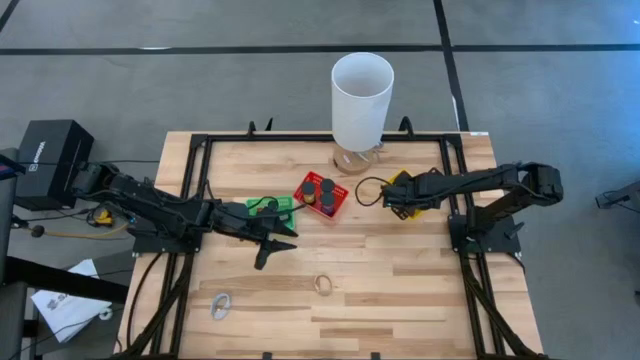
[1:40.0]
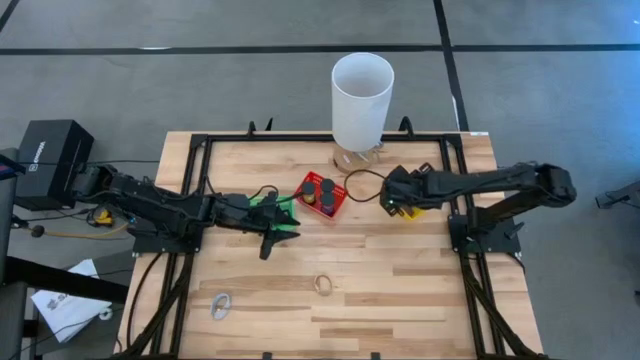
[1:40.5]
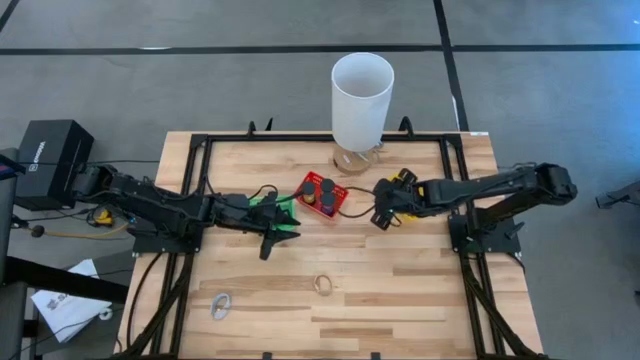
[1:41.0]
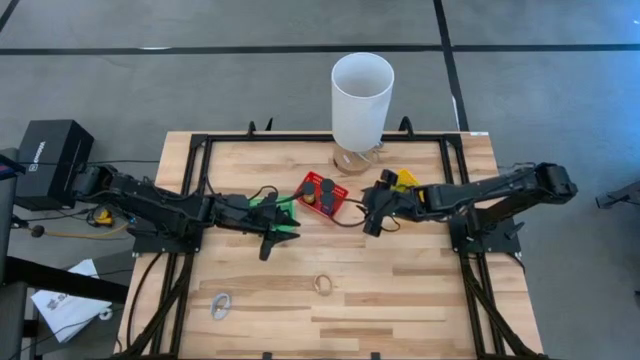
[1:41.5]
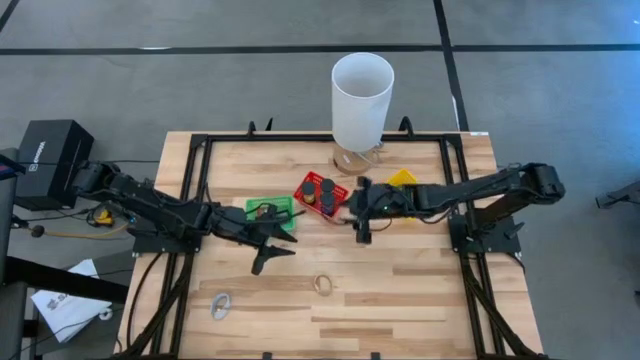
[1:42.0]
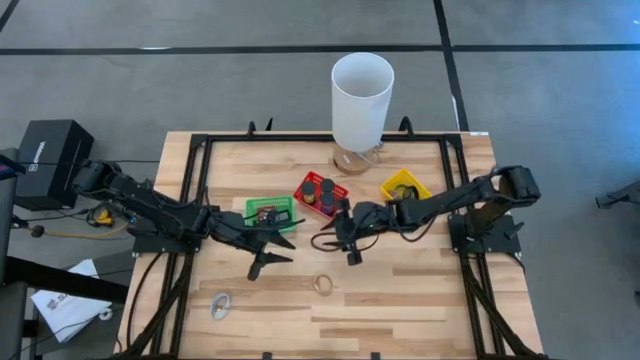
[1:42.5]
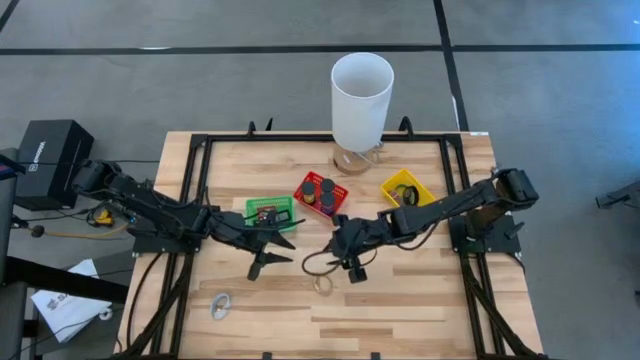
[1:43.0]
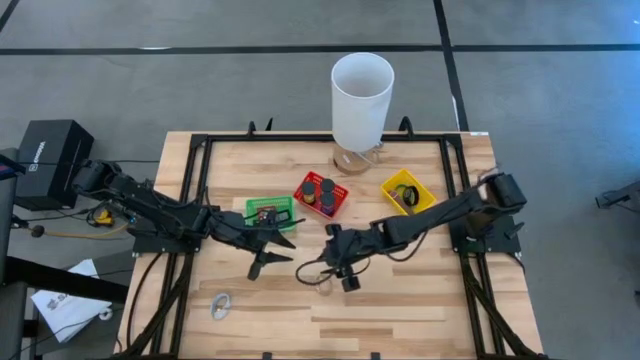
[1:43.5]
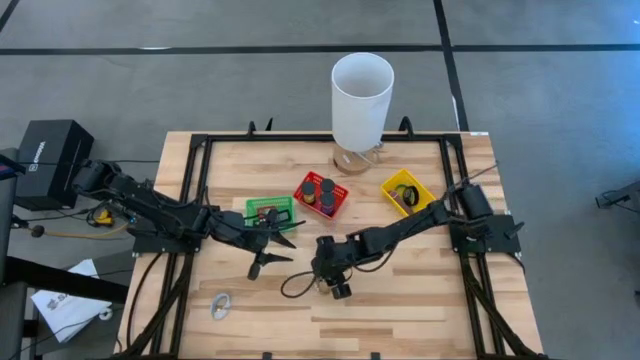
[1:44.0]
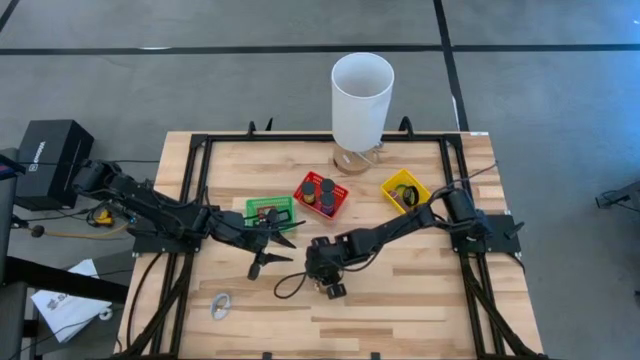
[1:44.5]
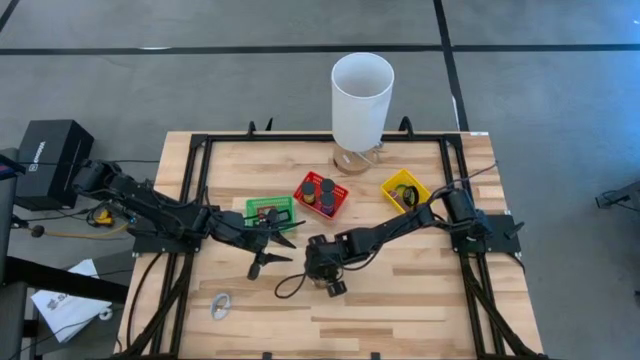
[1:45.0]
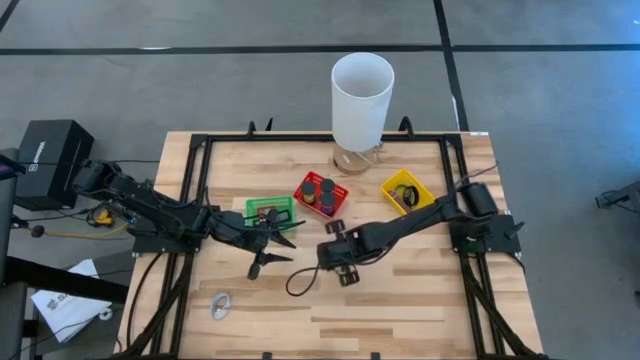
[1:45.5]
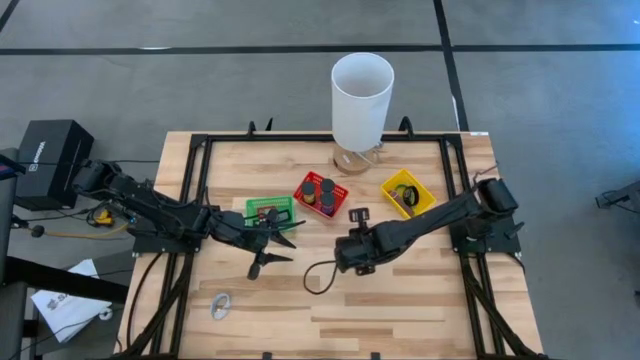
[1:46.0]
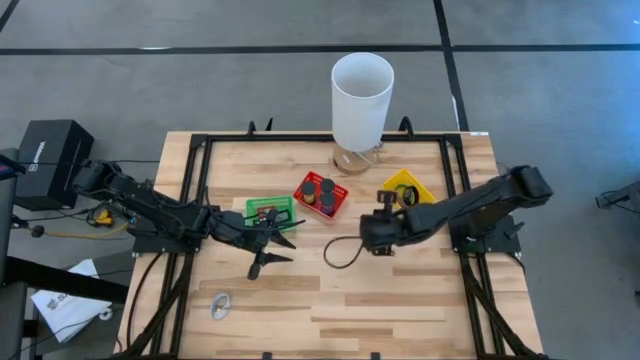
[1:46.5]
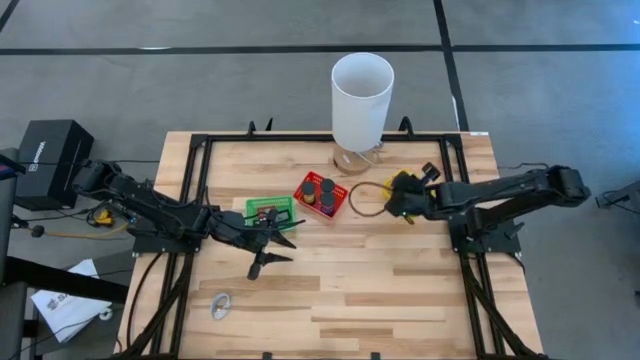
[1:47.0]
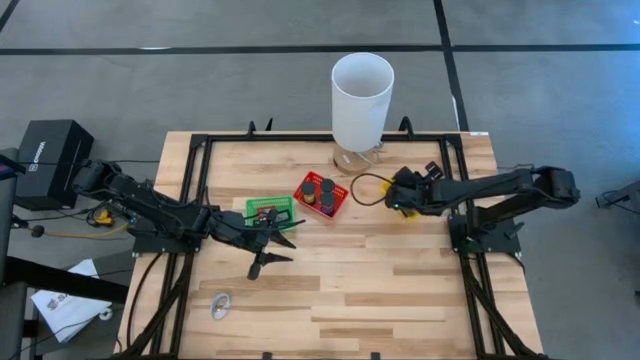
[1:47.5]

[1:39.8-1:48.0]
Task: Pick & Place Office items
Put the gold watch into the yellow bin

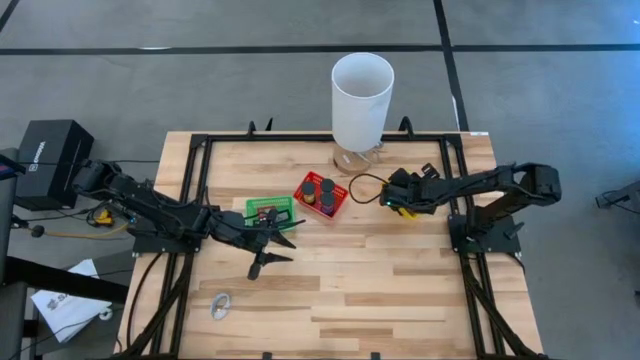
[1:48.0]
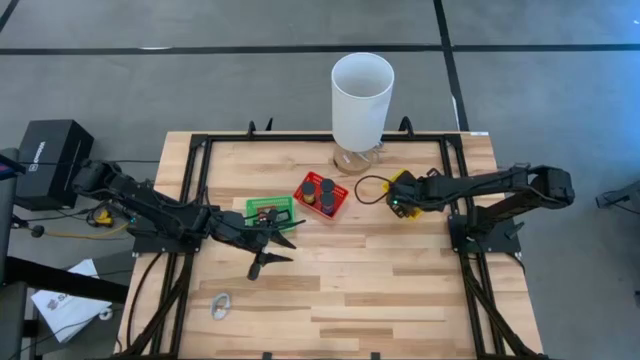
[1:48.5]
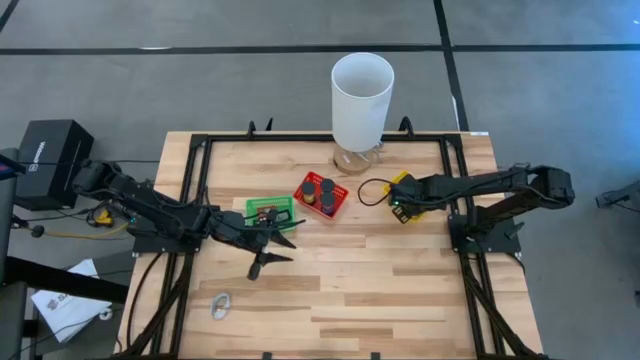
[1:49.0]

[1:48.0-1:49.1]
Adjust the black watch

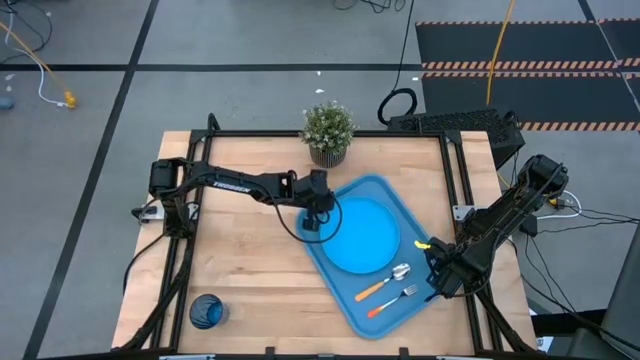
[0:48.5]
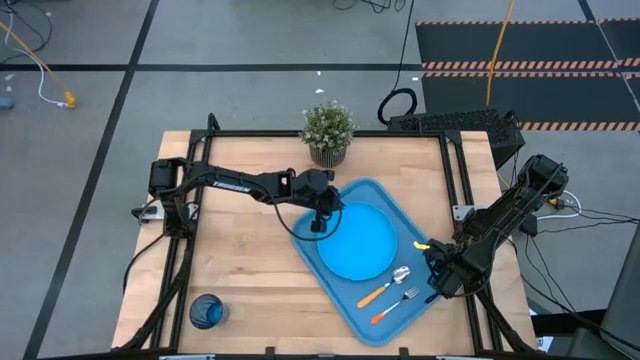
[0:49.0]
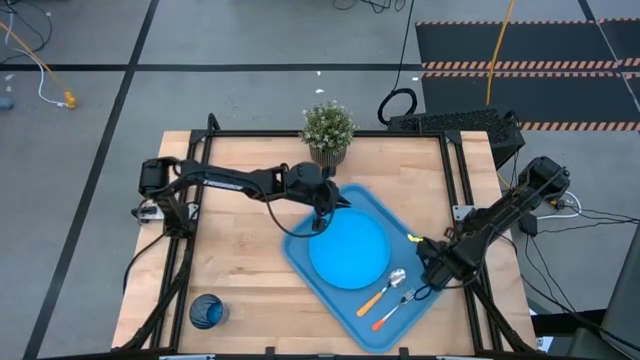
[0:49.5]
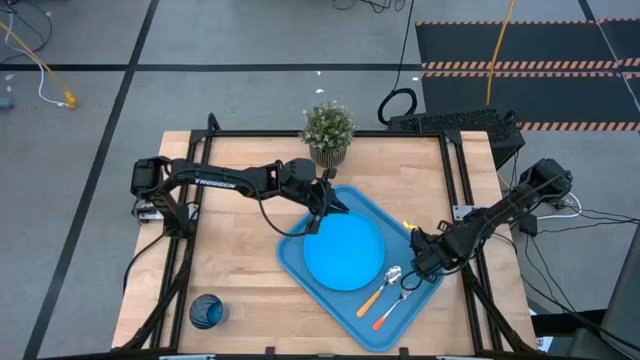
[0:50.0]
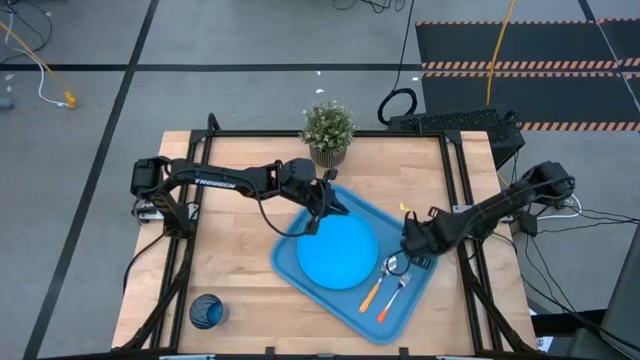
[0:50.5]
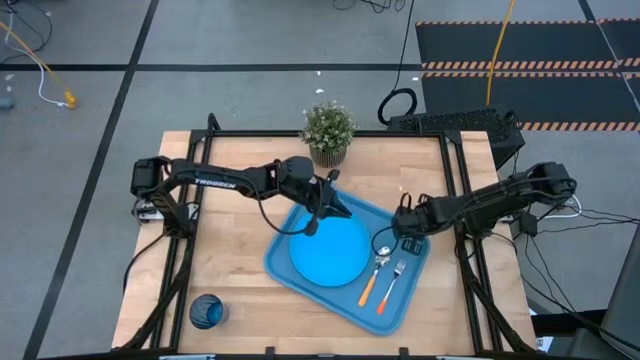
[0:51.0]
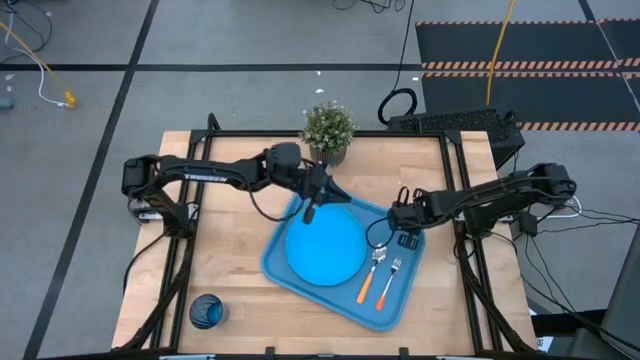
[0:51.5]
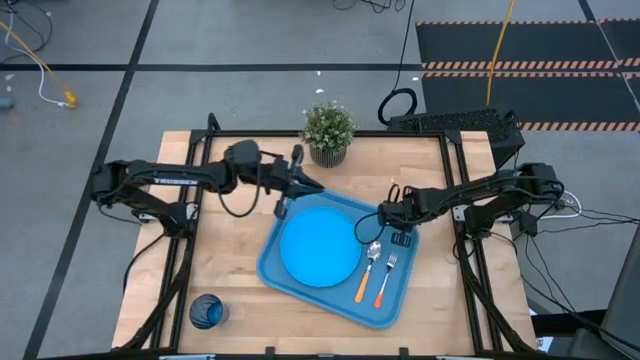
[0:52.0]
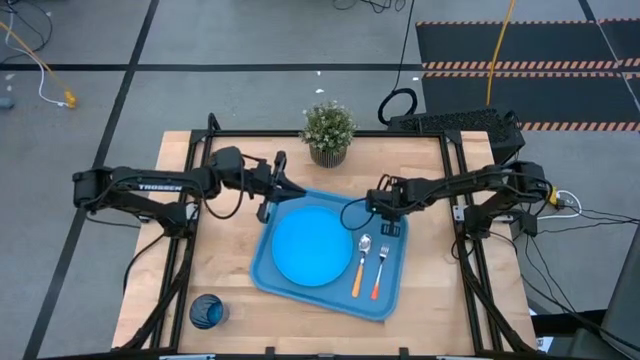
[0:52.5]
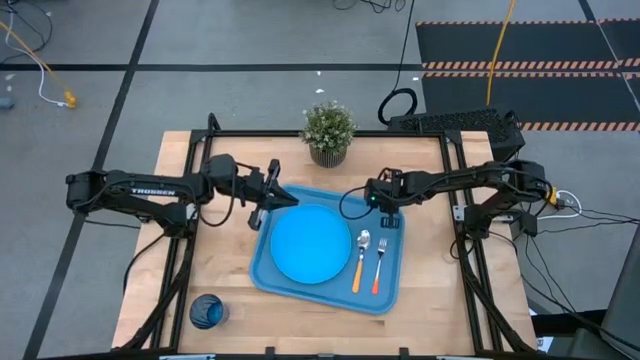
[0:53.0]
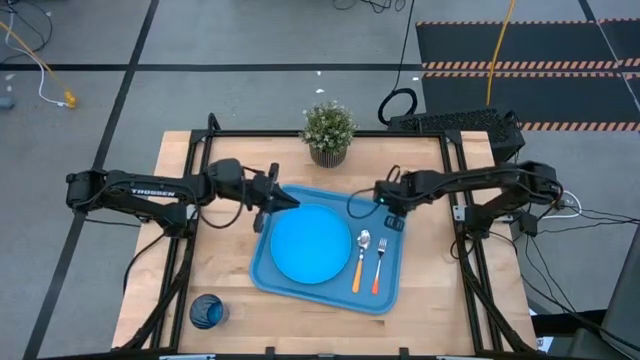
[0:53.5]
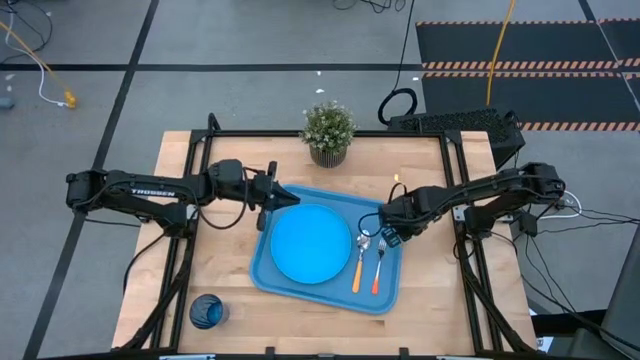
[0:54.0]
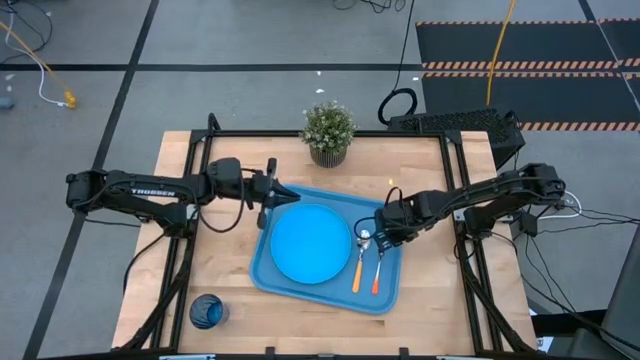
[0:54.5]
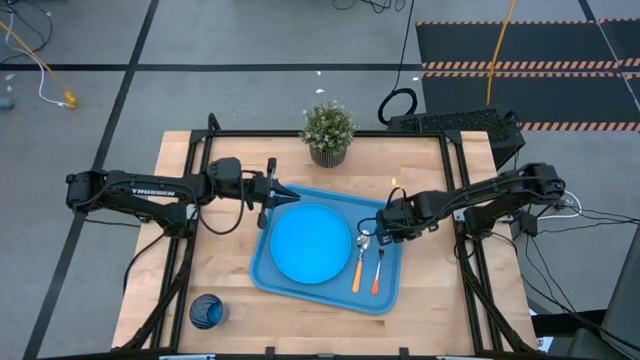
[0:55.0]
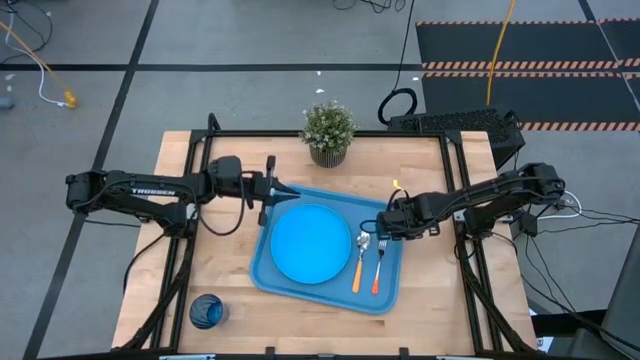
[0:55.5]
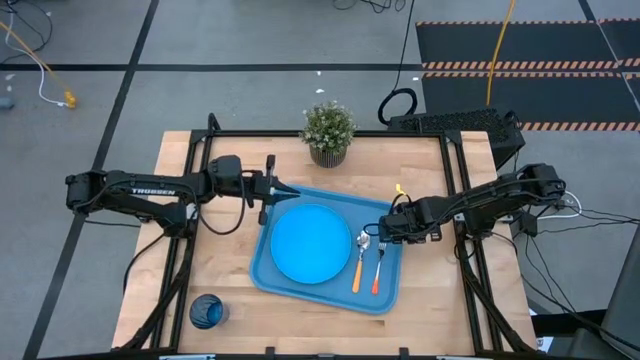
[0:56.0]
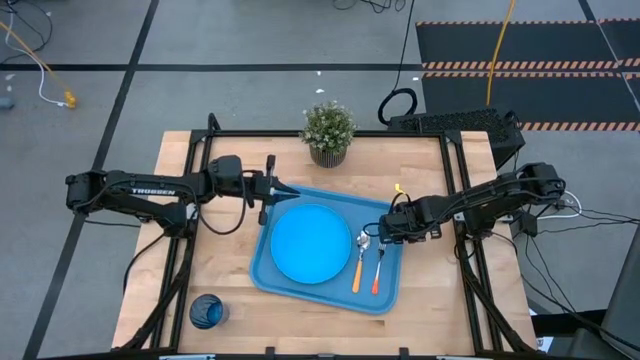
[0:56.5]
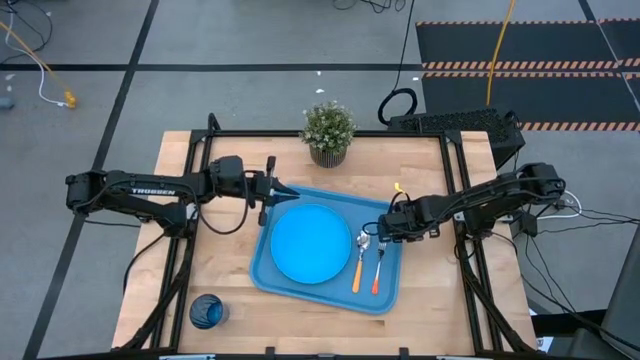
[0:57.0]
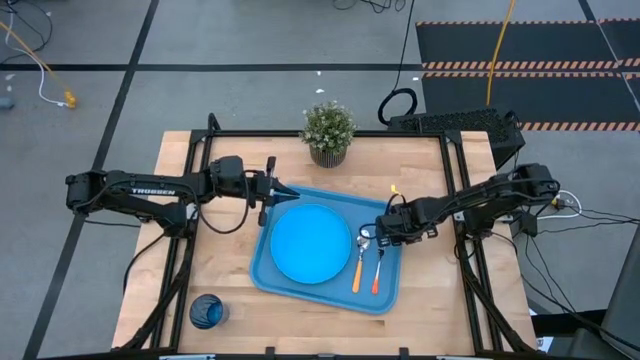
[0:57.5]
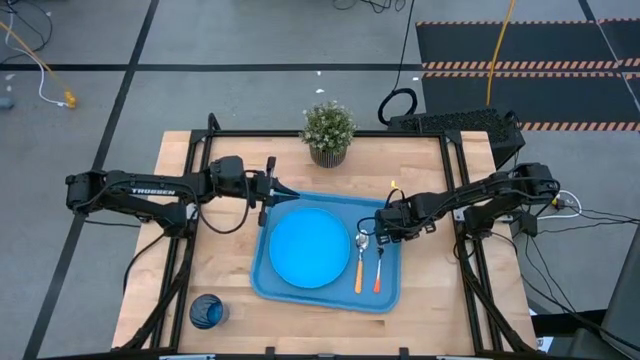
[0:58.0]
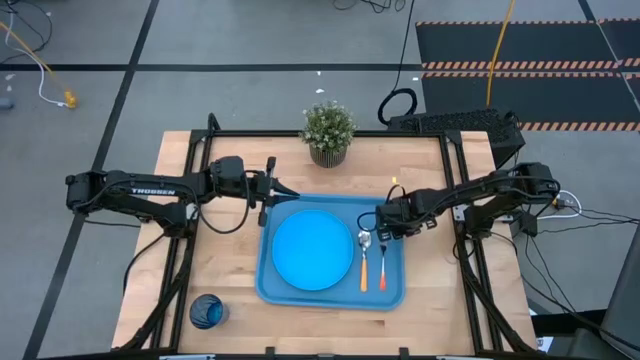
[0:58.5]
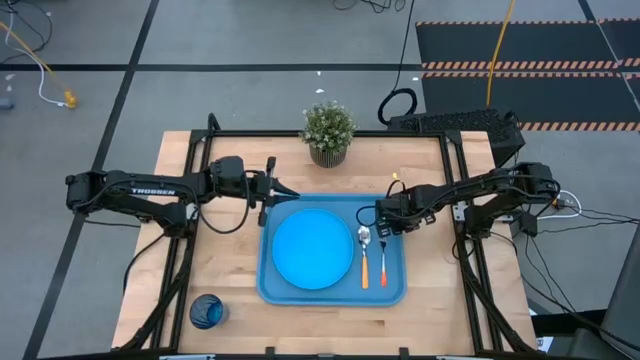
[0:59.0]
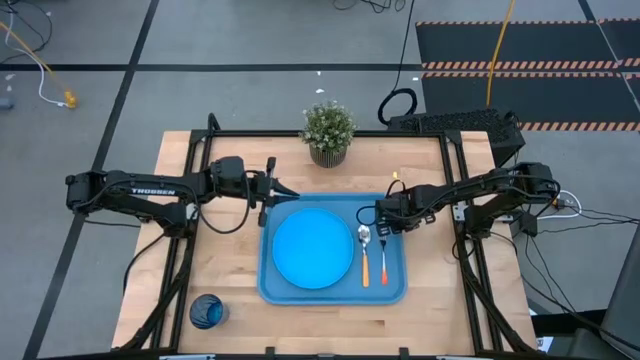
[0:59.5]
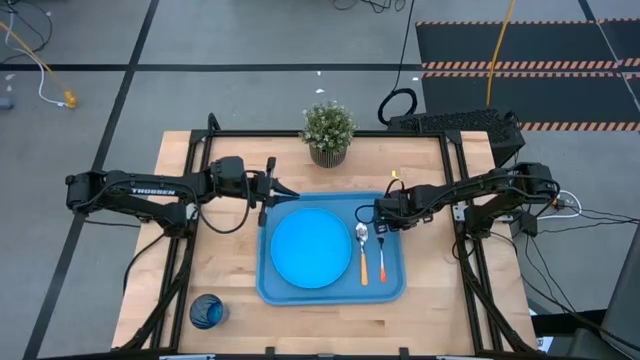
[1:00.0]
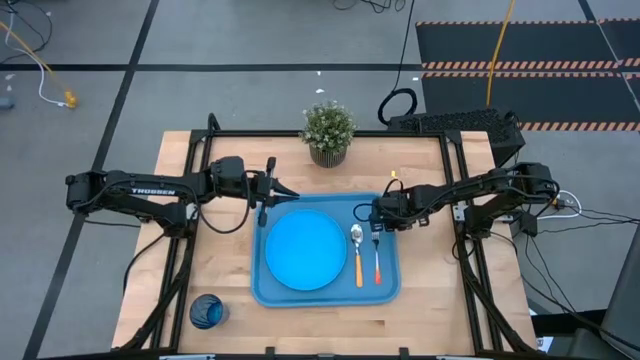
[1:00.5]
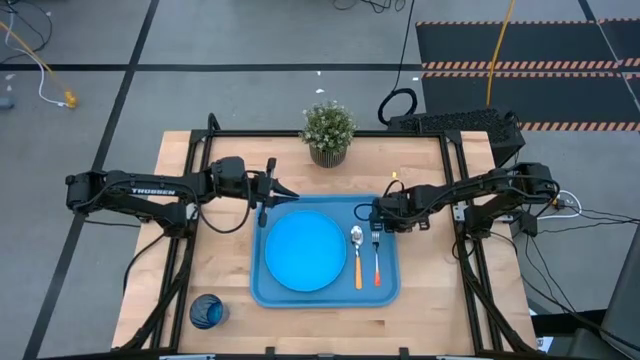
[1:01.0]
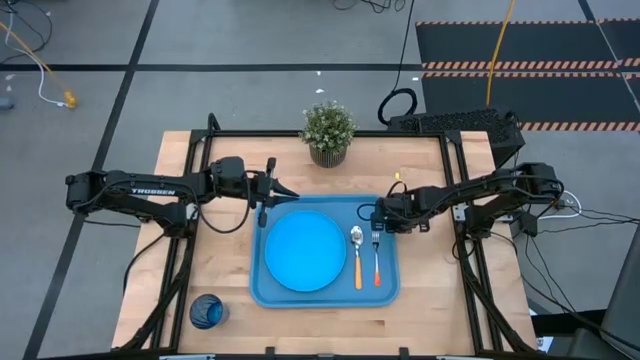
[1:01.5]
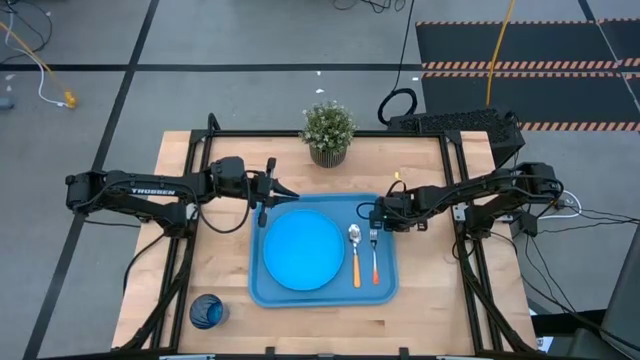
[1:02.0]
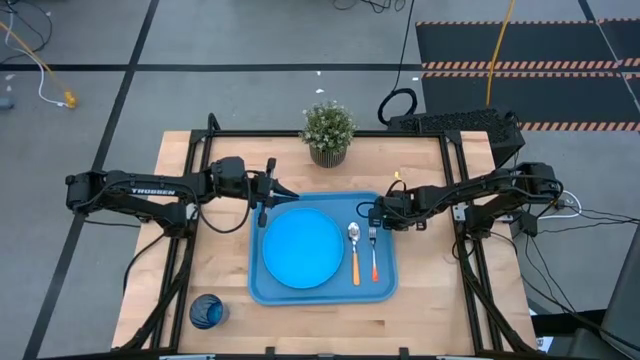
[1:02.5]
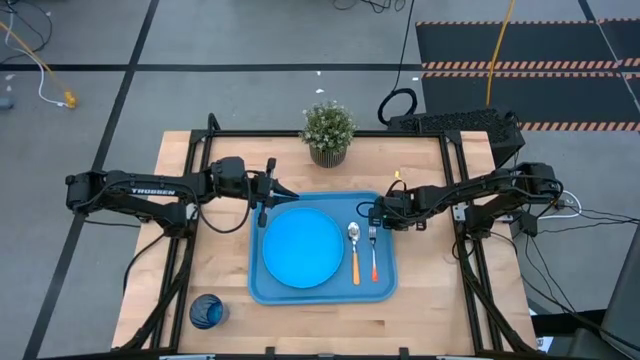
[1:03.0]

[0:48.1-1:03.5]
Task: Pick and place plate/cup/fork/spoon on tray
Move the blue tray to the center of the table
